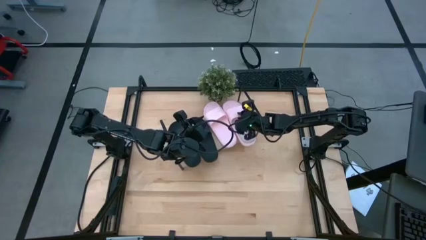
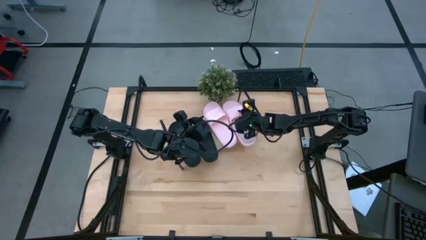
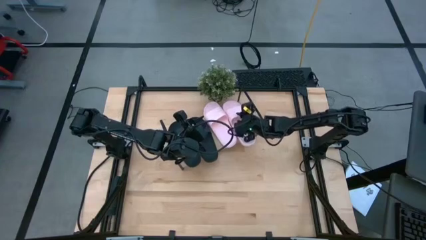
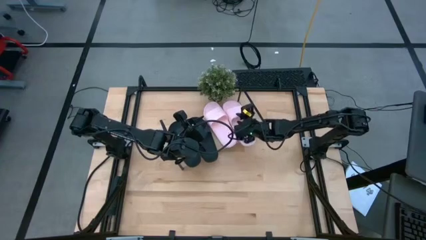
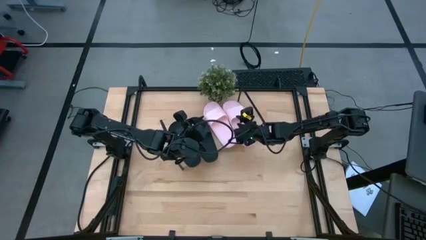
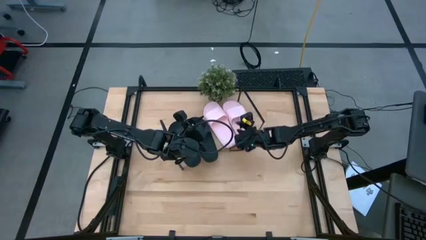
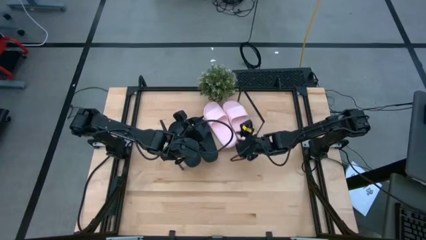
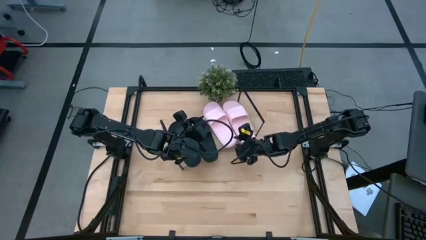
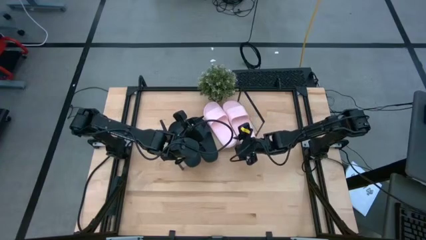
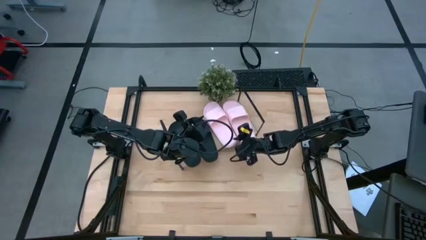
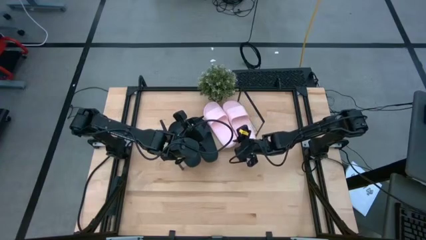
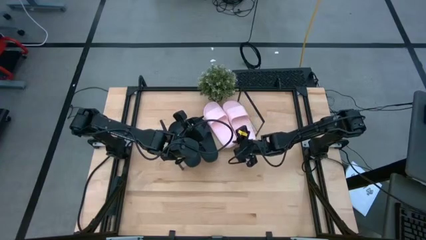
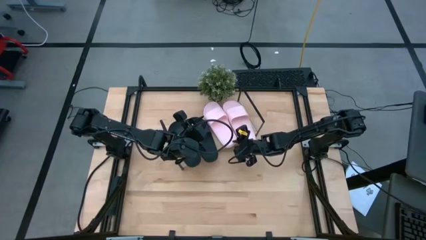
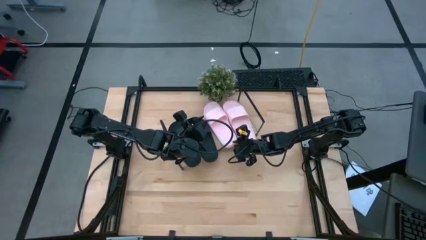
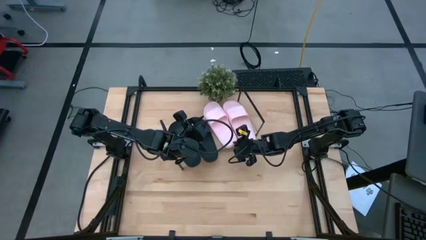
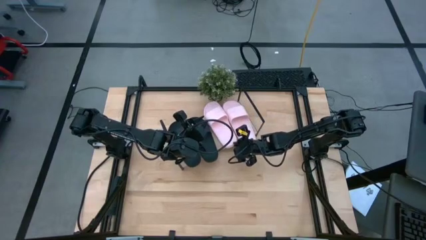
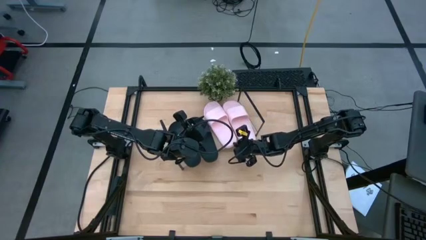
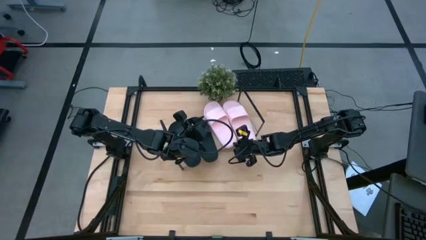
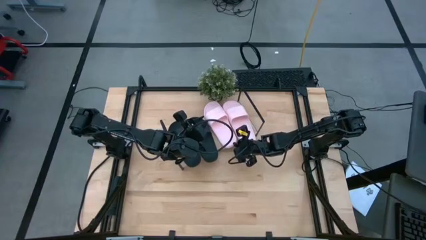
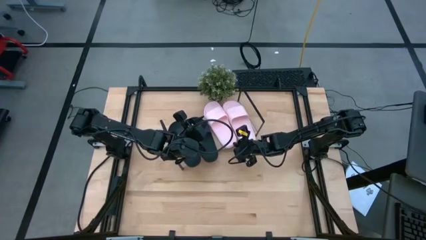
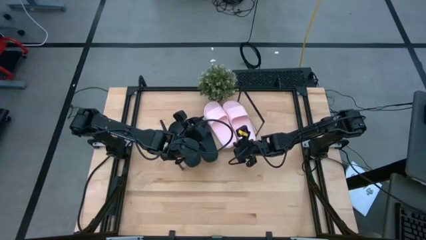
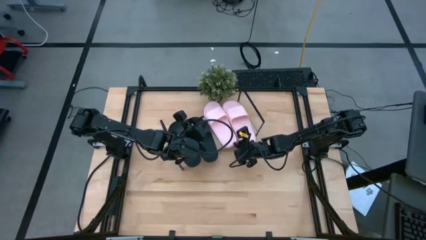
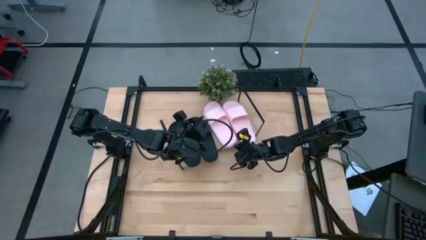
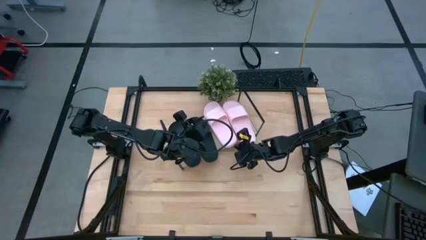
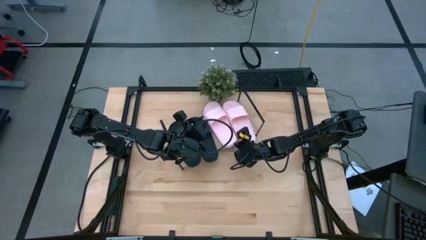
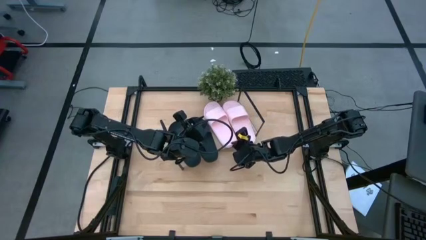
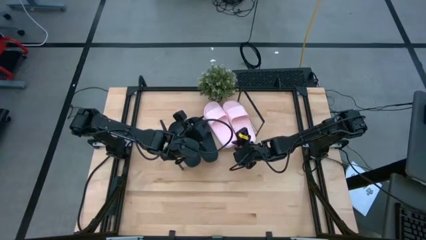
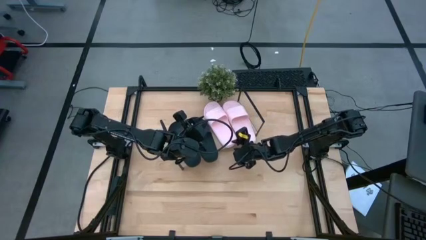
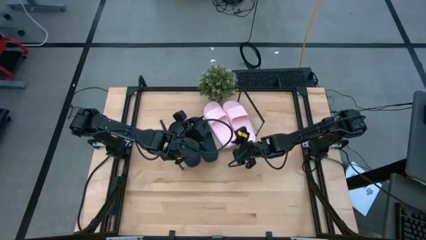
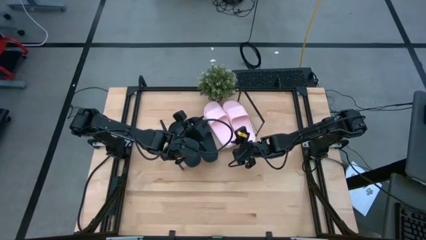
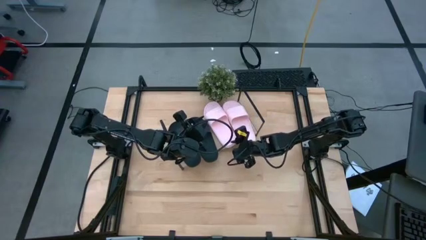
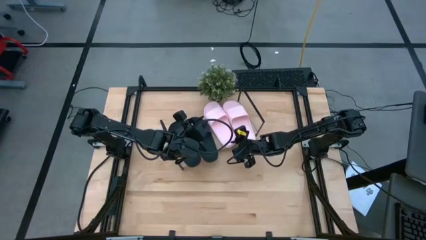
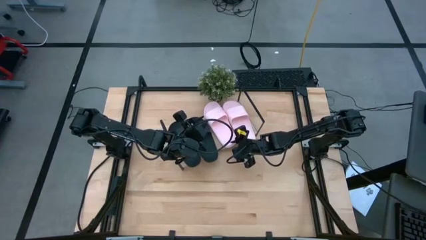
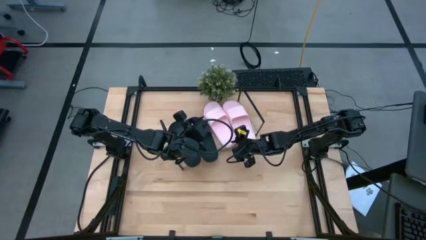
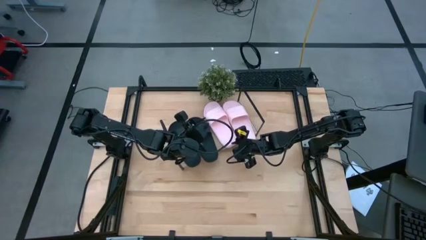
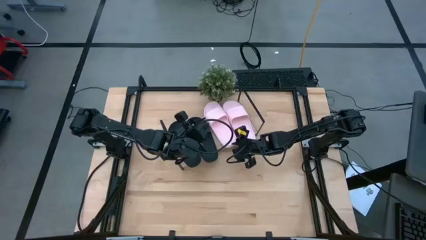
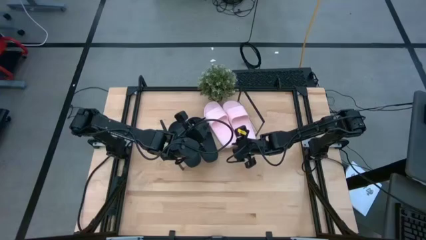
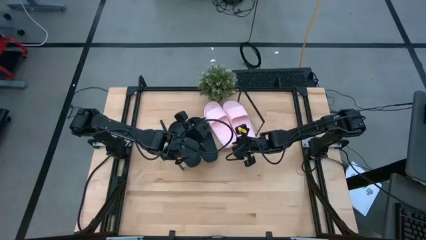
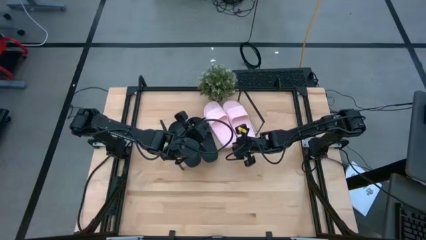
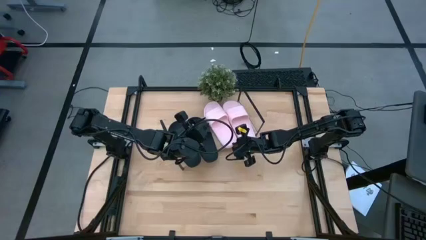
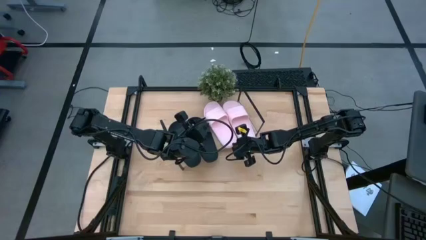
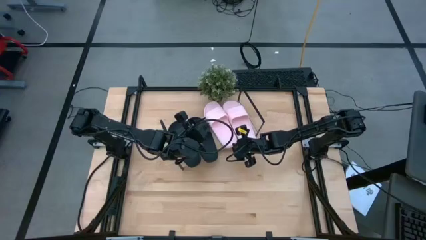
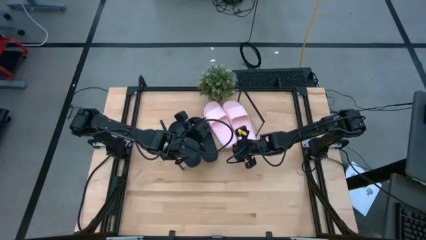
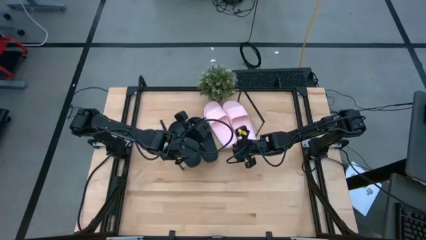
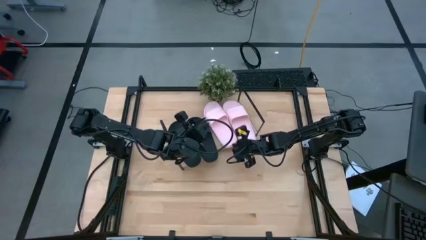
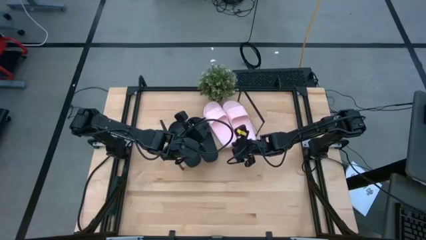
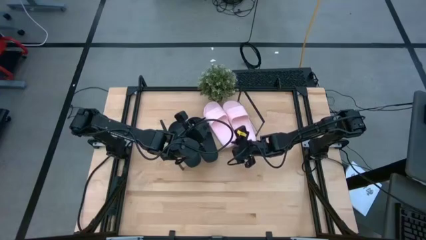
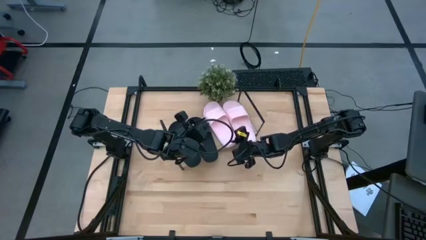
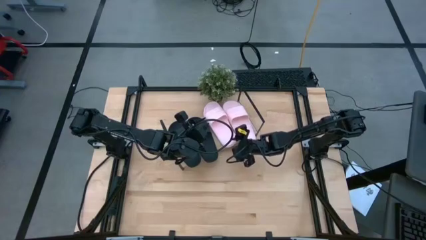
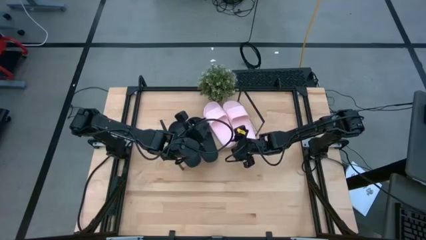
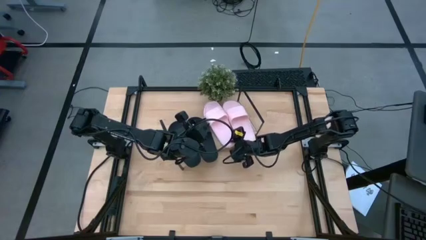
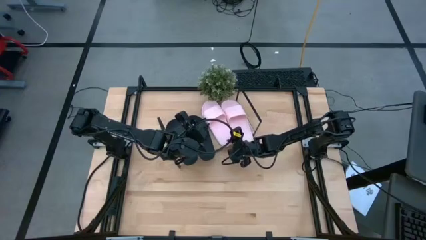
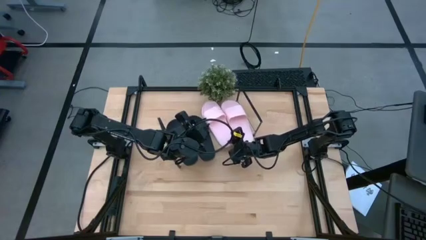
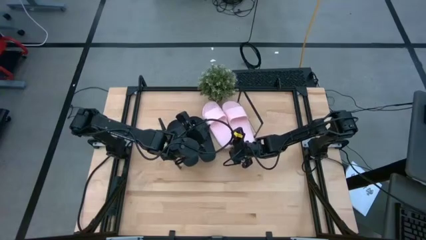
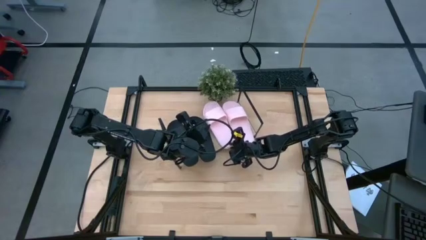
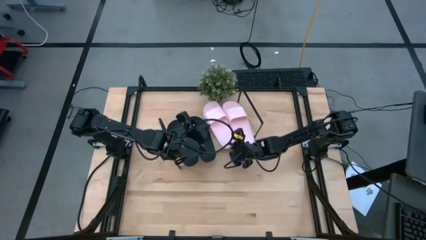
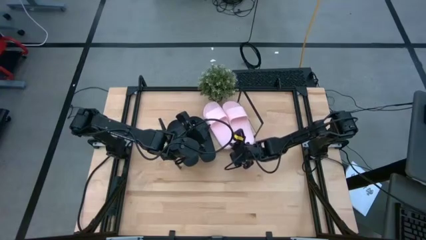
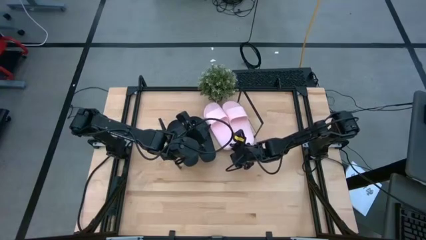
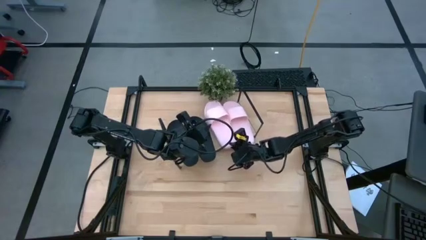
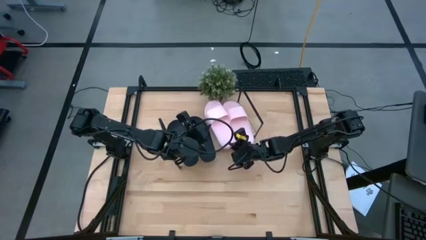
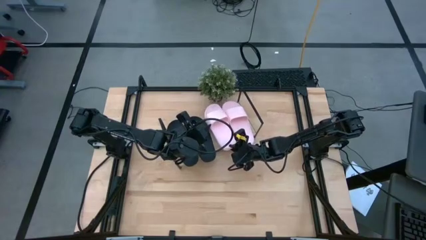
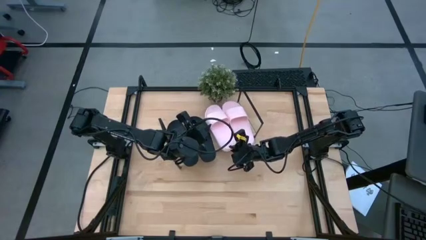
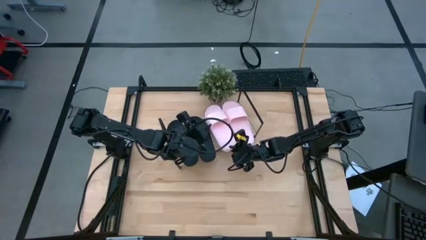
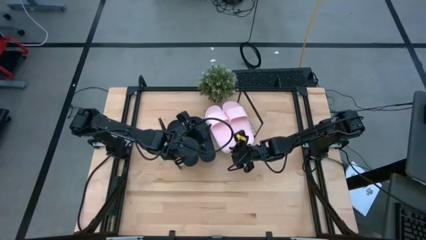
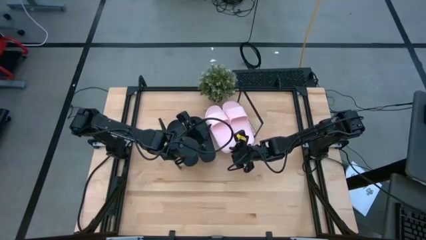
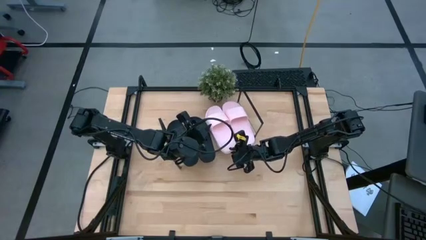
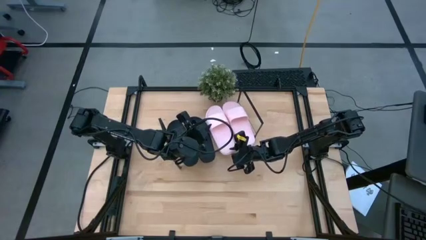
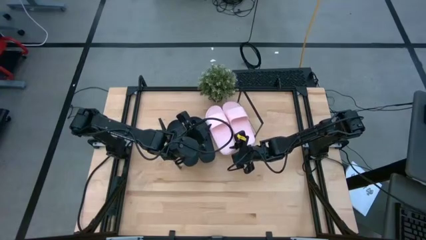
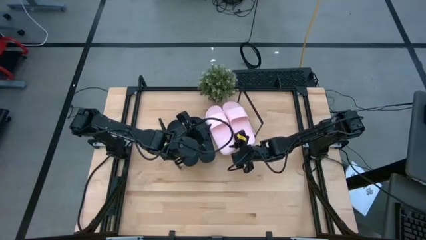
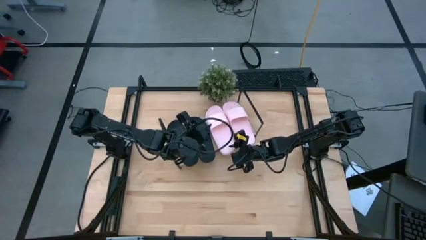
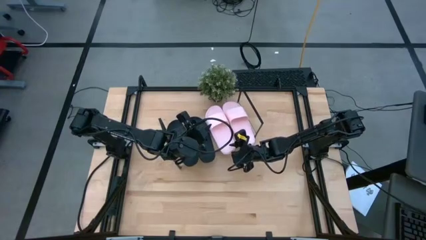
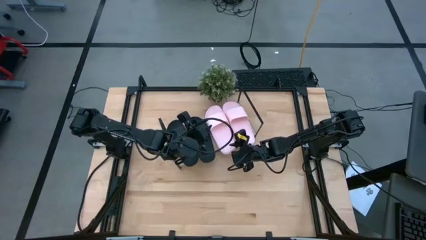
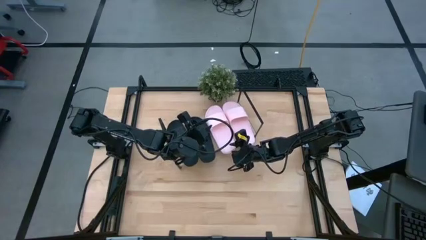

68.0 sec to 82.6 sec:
Task: Pick and place slides into the shelf
Adjust the left pair pink slides on the shelf

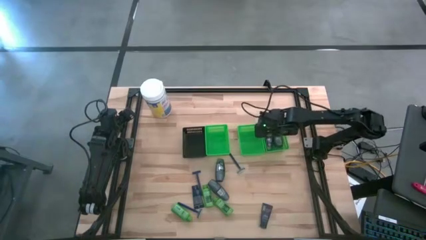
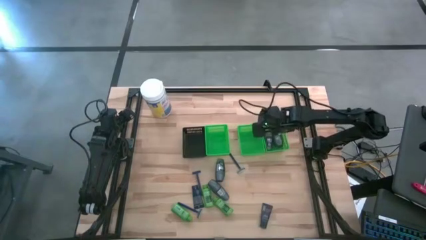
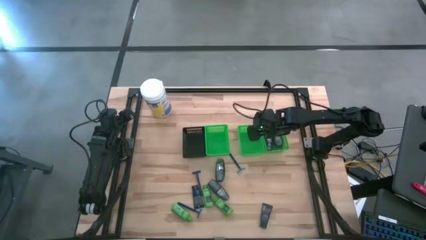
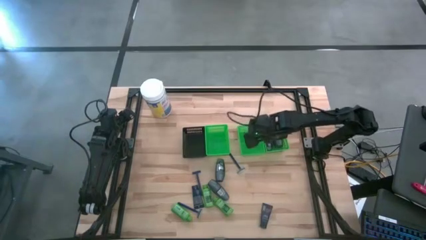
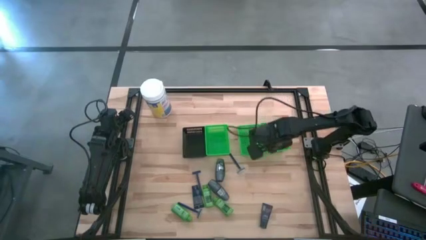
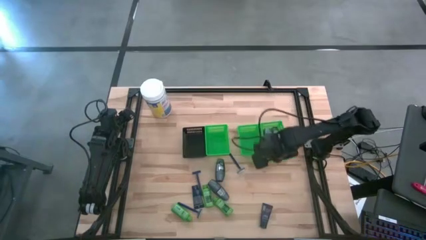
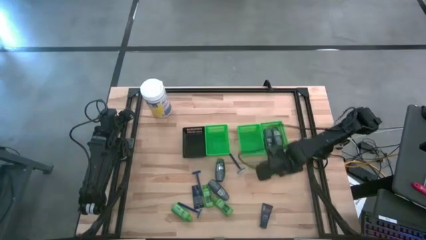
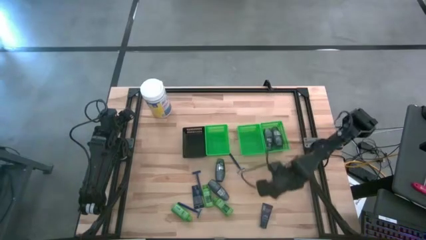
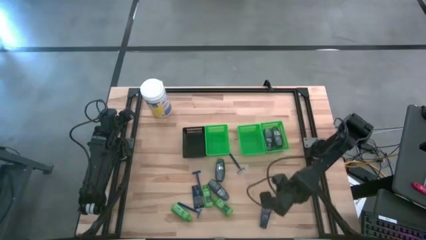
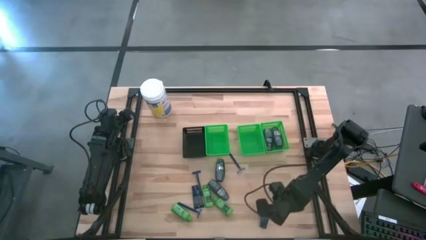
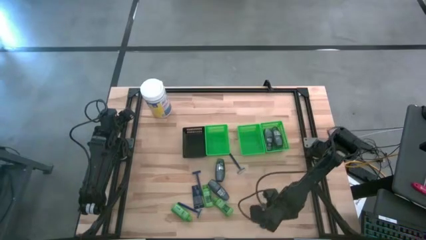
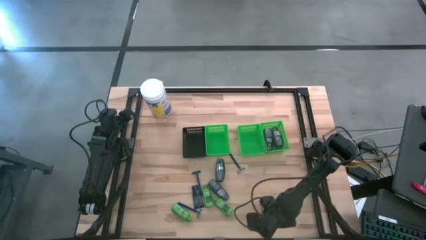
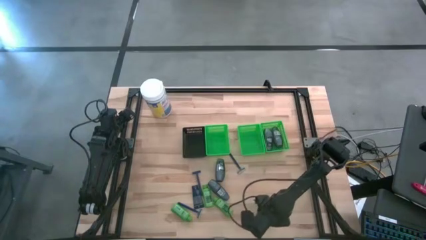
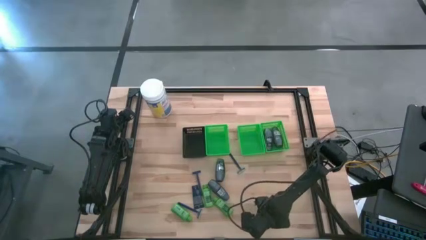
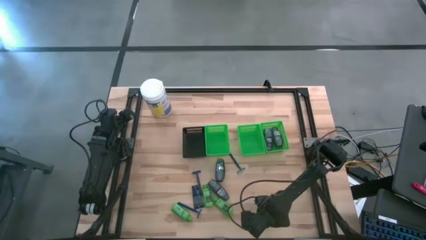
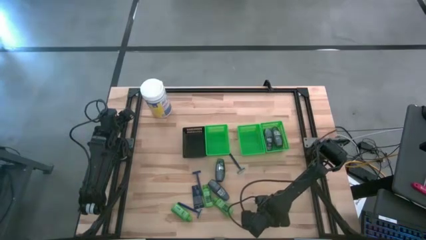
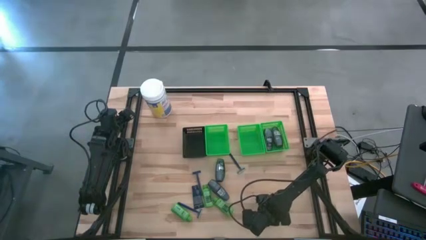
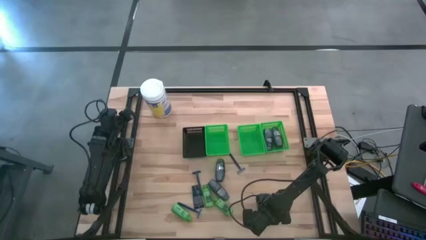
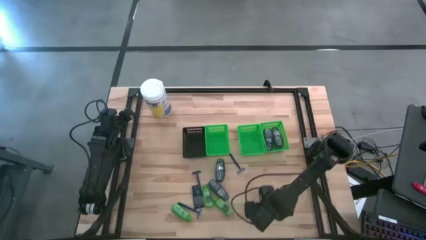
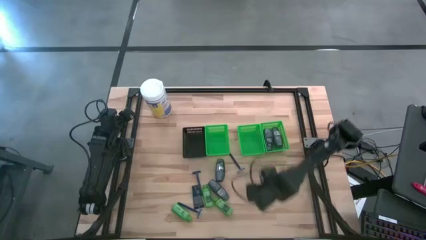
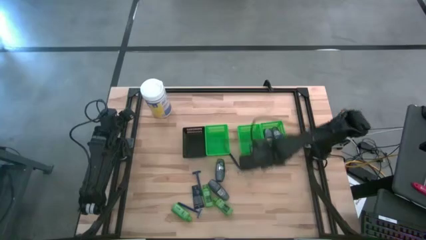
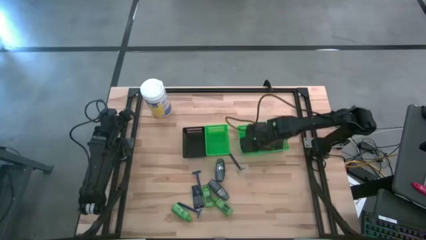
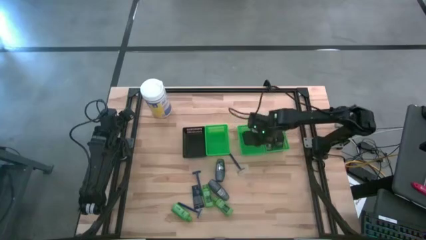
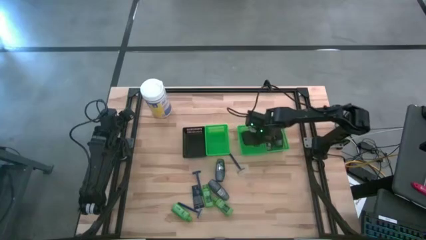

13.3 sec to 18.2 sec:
Task: Pick & Place Travel size toiletries
Put the blue shave cream into the middle green bin
